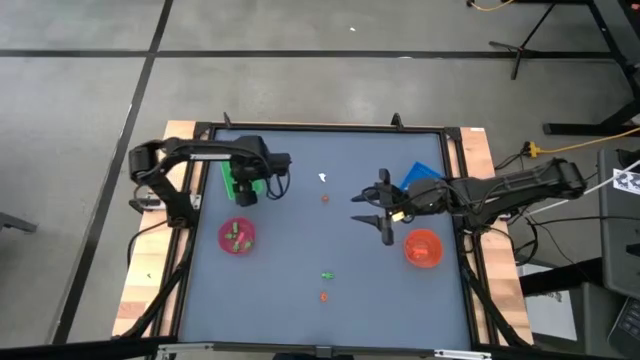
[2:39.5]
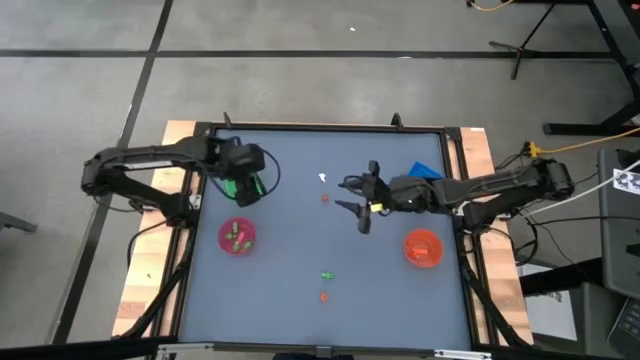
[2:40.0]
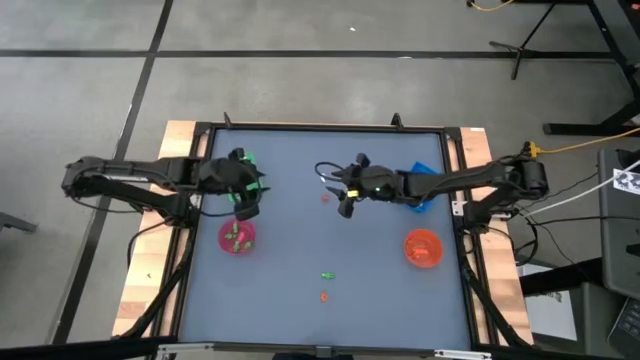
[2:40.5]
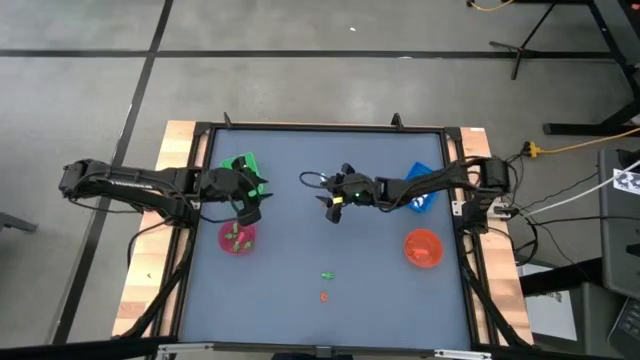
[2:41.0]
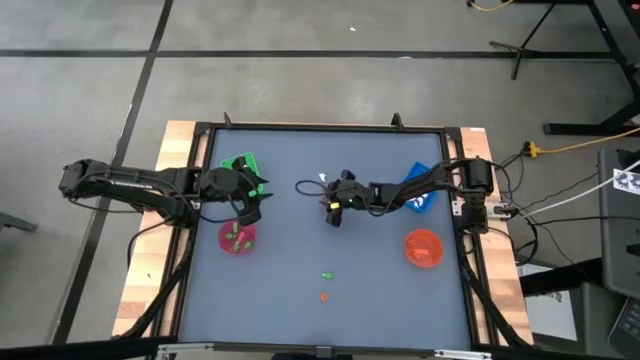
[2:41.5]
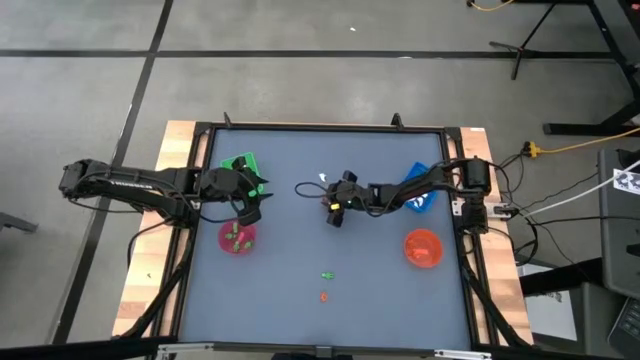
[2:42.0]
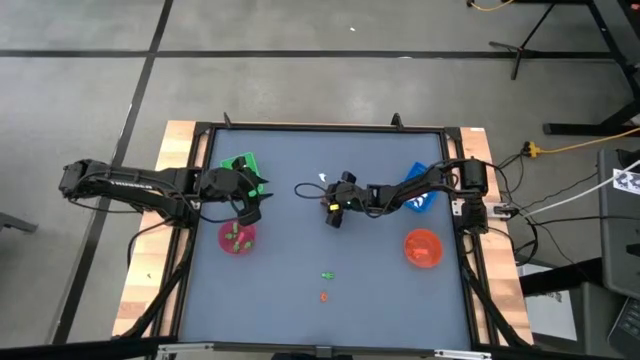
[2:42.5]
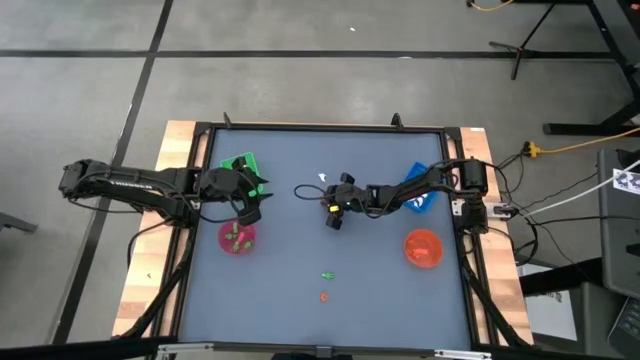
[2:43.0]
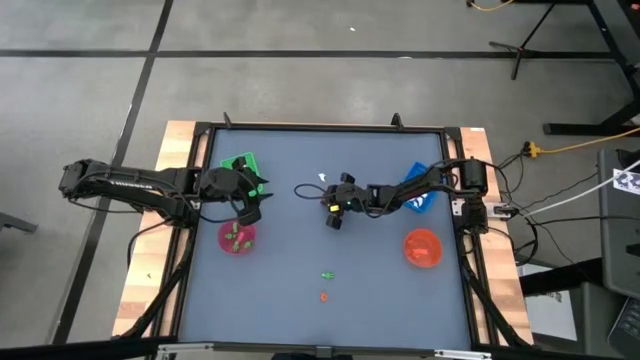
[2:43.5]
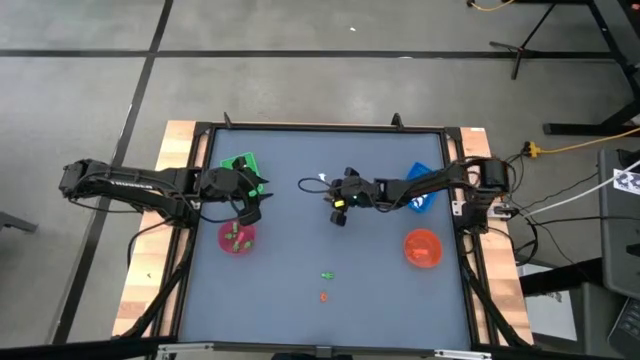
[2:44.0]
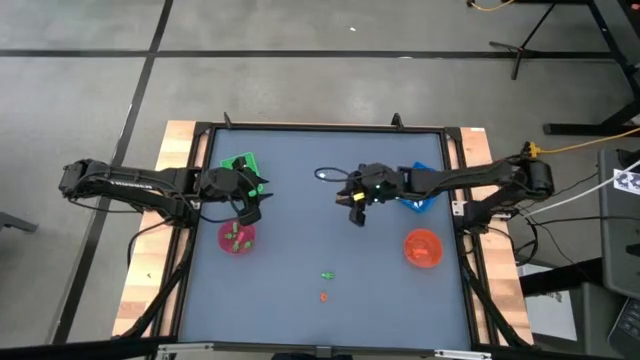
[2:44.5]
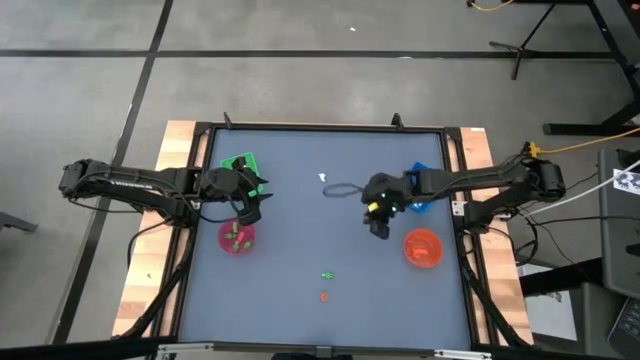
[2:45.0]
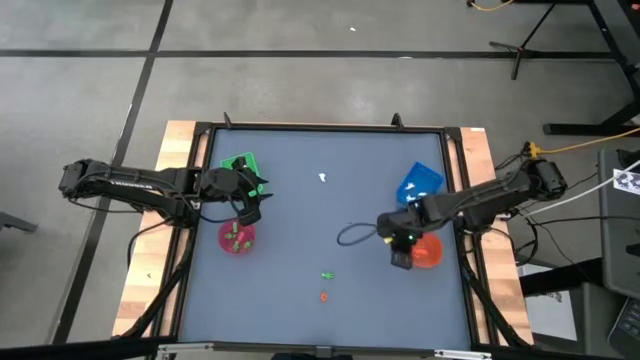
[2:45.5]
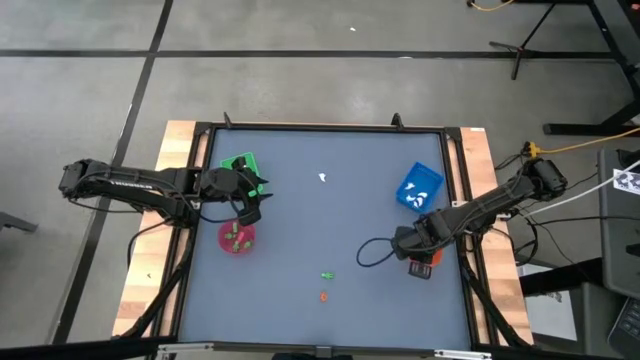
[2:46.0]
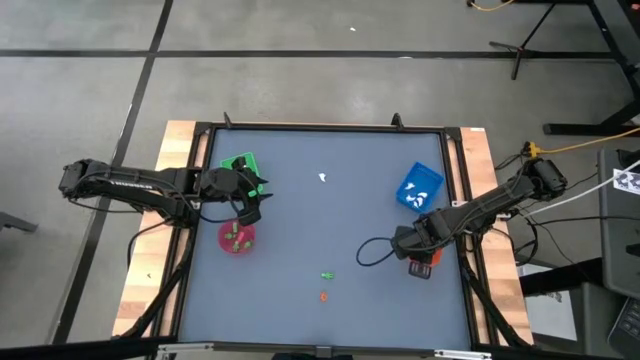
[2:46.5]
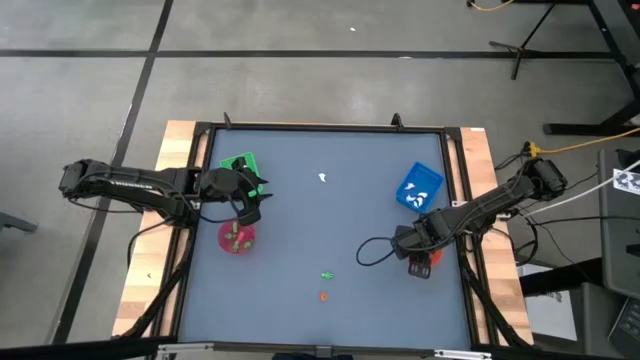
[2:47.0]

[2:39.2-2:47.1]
Task: Sort Halloween decoration
Put the small orange pumpkin toy into the transparent orange bowl

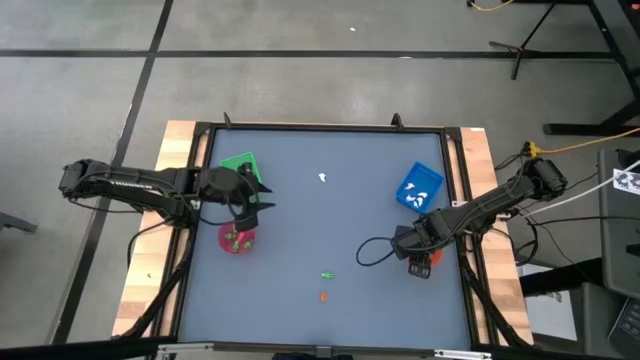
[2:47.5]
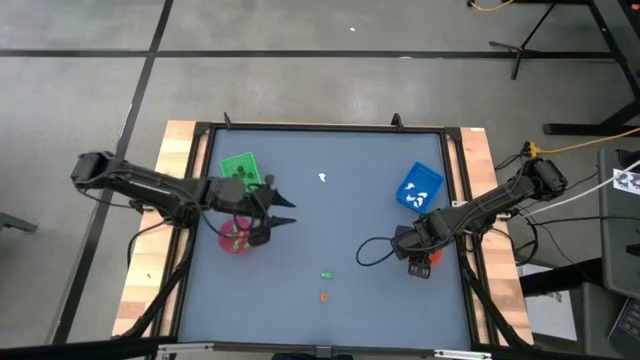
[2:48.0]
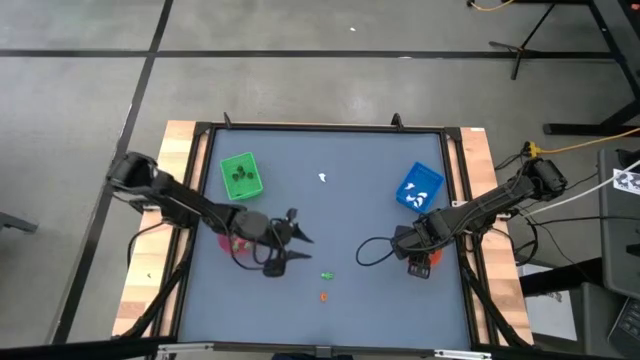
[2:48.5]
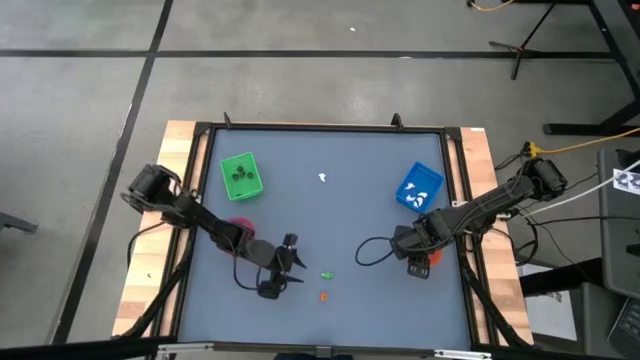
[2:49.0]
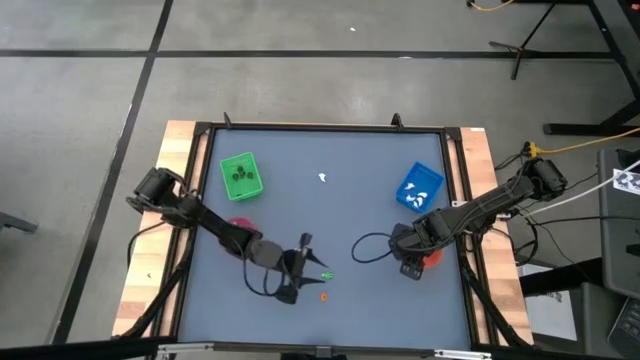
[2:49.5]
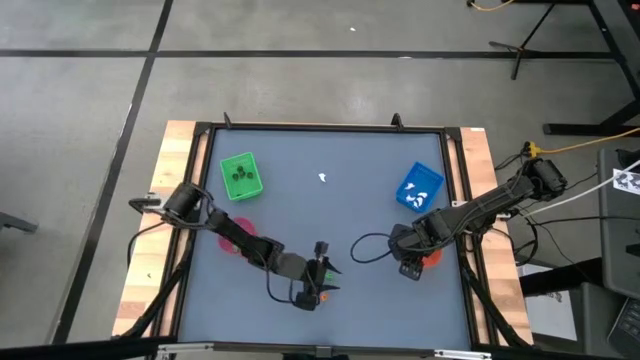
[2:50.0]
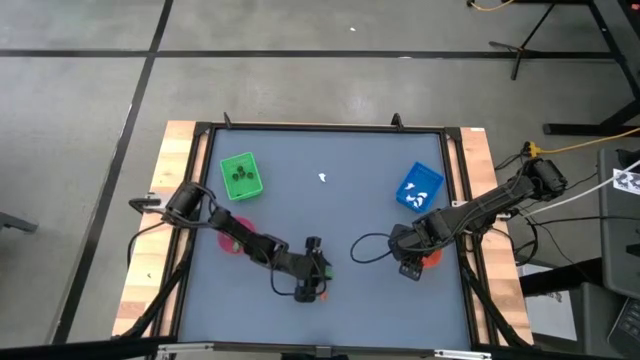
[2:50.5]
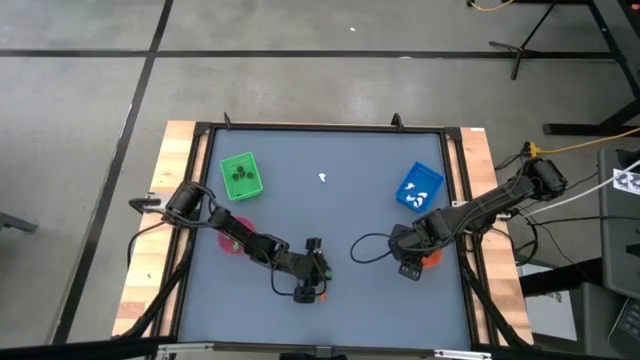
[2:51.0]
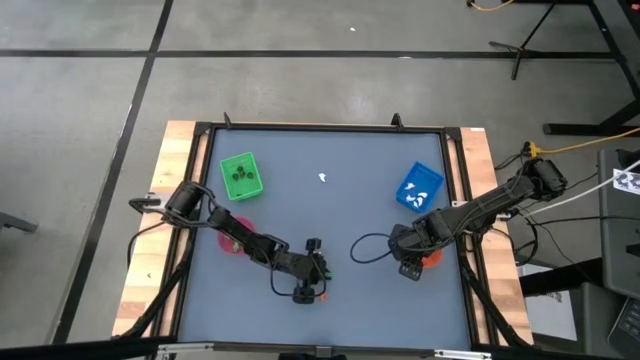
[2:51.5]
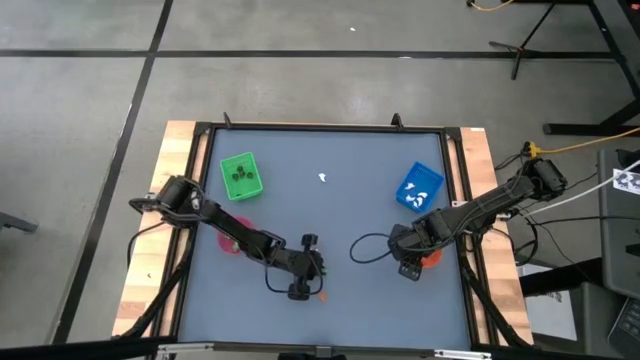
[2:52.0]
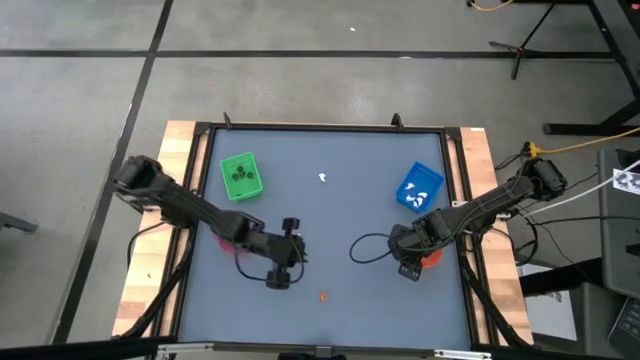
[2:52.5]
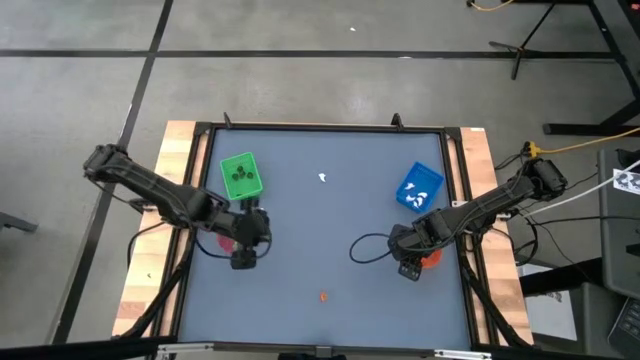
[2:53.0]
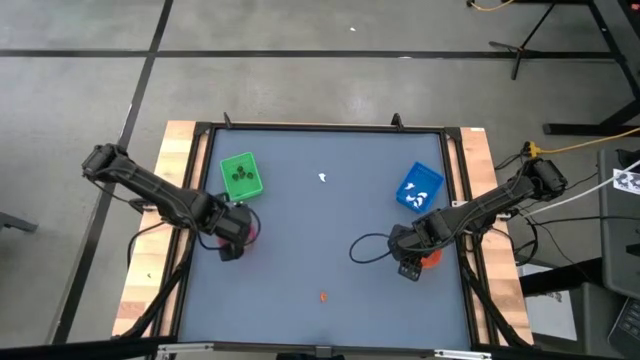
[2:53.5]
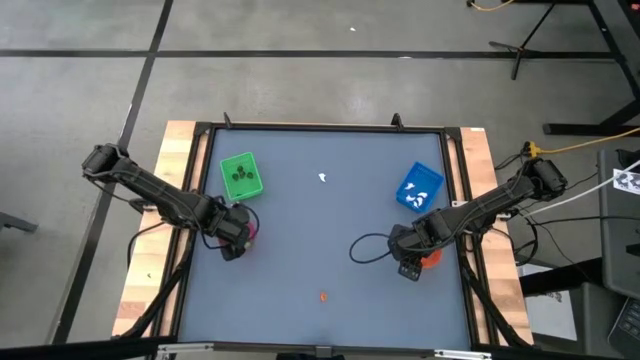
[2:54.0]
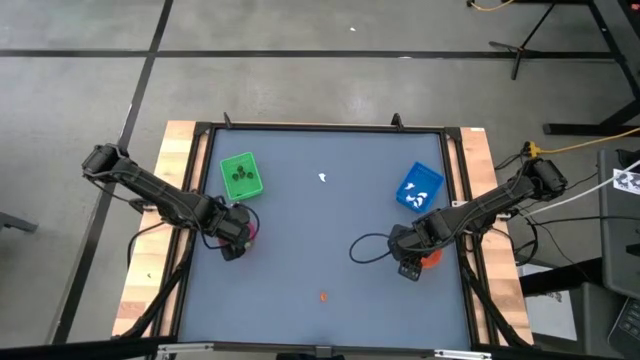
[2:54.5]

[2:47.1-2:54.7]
Put the small green skeleton toy into the transparent red bowl

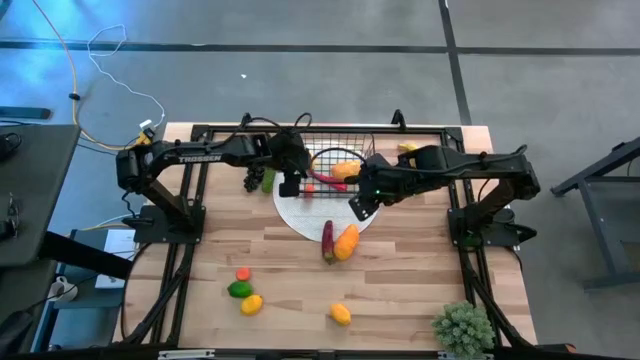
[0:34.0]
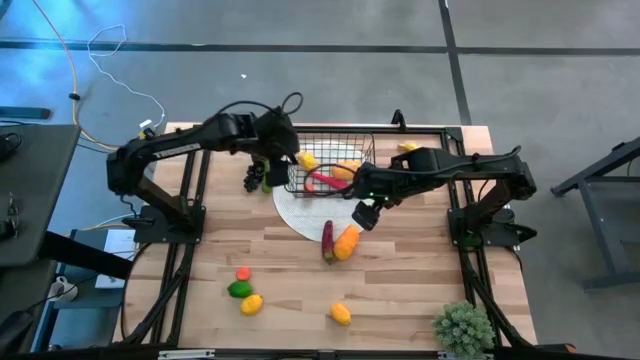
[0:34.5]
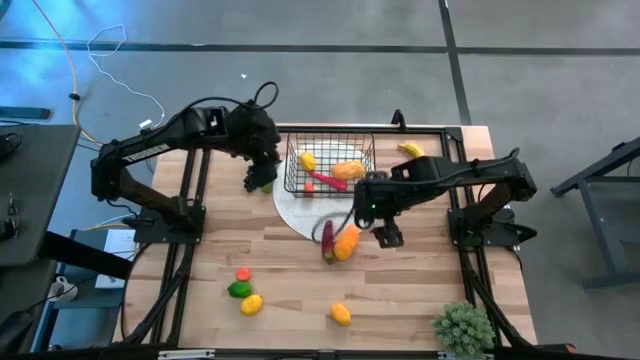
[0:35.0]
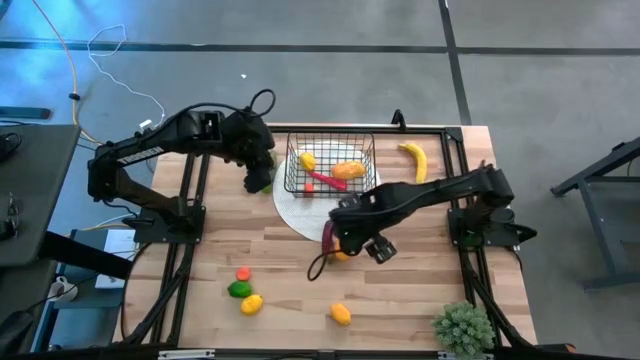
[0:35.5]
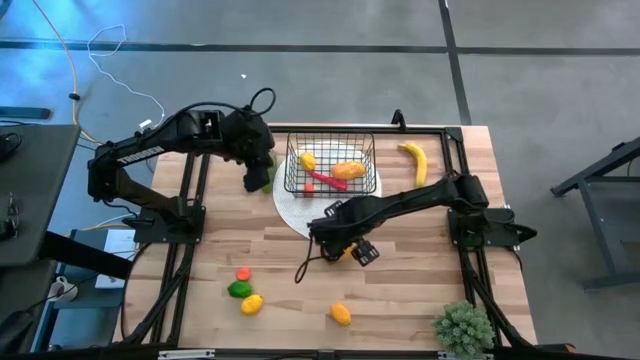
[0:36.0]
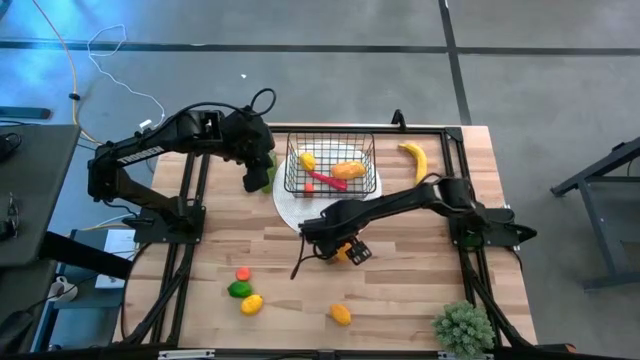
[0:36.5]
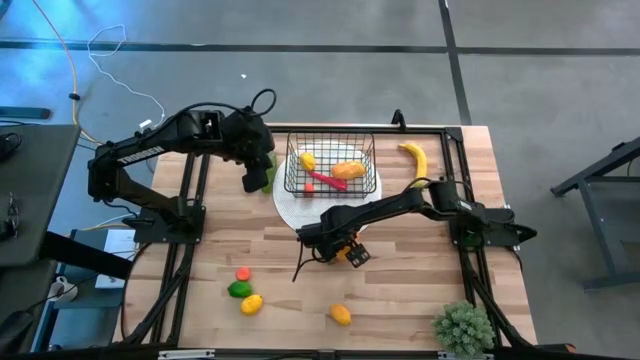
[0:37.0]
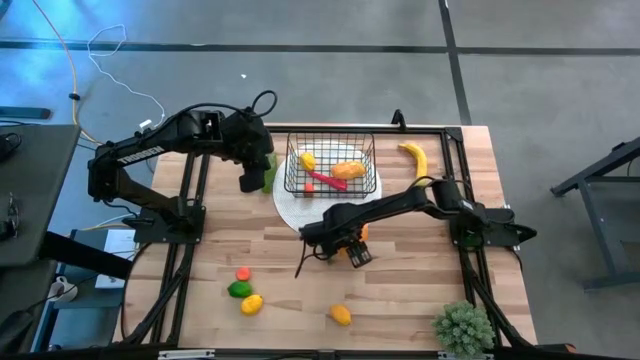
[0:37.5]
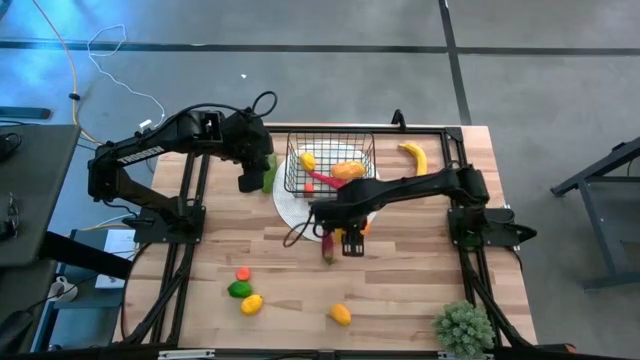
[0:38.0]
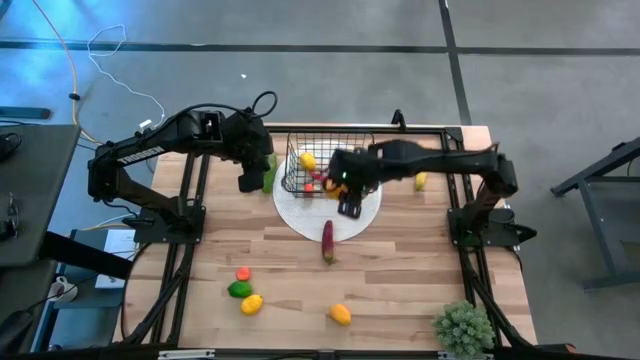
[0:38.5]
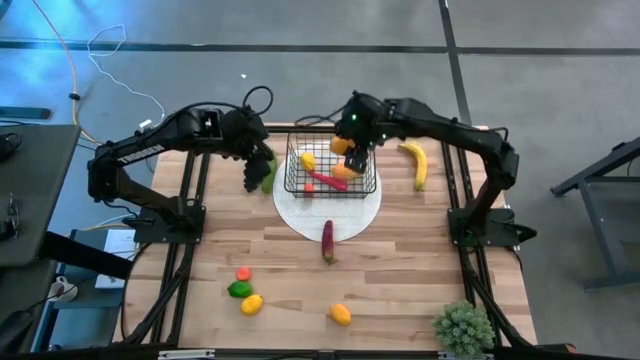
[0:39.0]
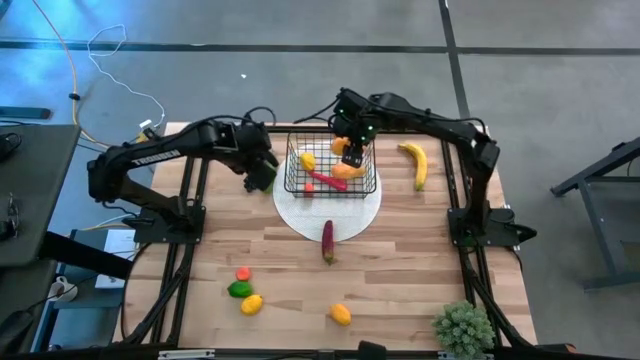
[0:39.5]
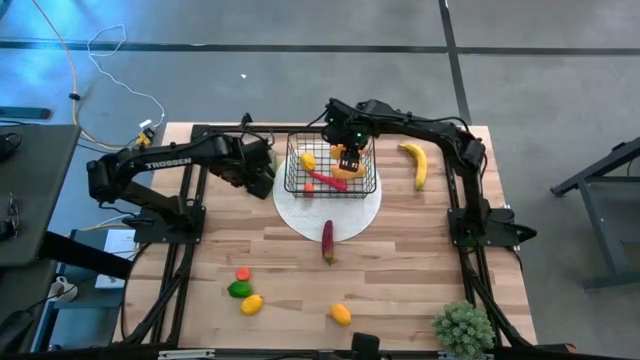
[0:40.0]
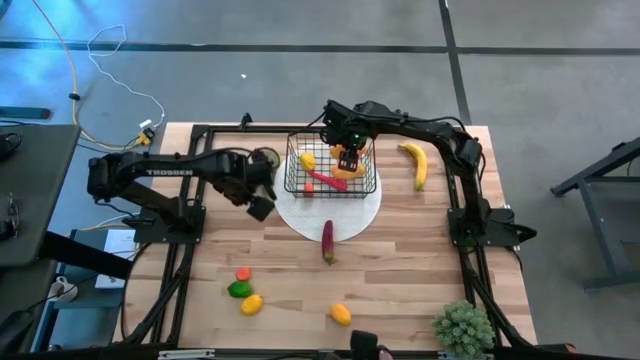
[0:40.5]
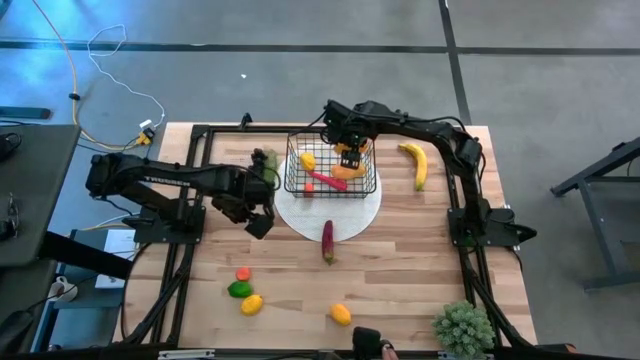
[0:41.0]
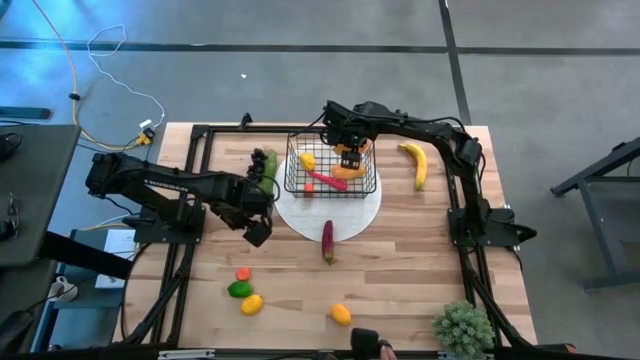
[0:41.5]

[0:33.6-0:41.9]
Task: Build produce basket
Put the mango into the wire basket
